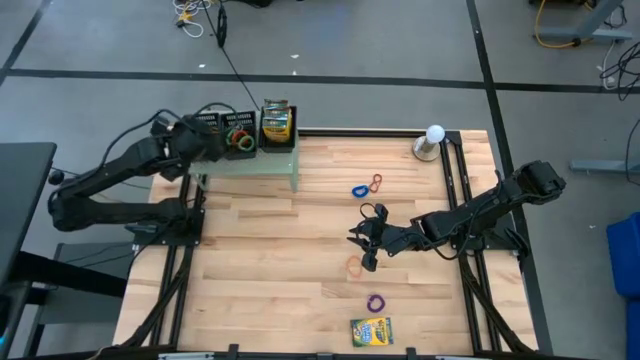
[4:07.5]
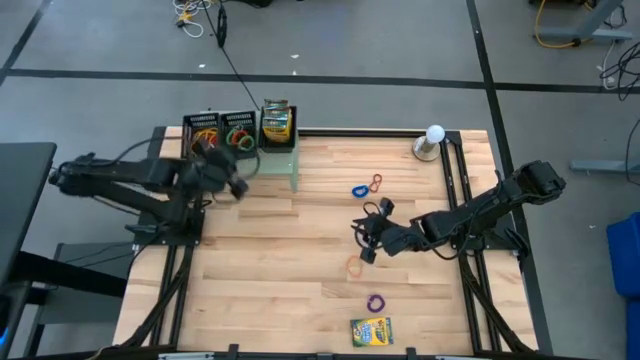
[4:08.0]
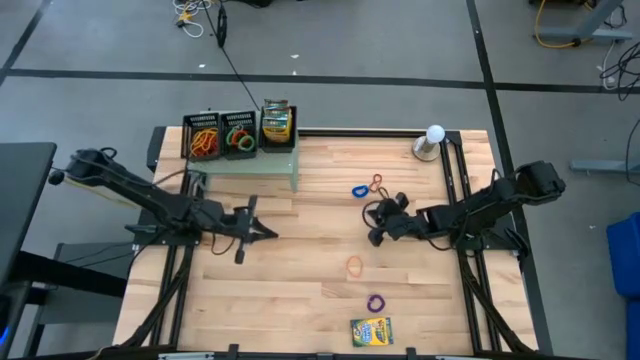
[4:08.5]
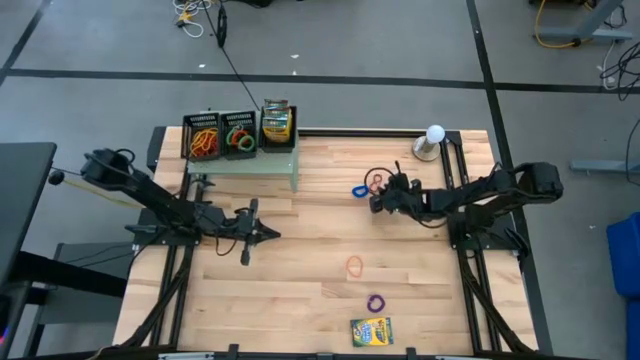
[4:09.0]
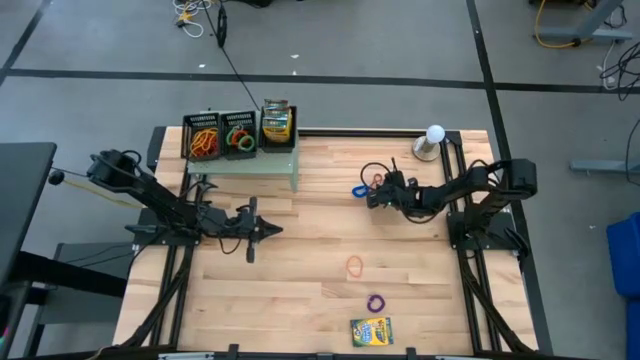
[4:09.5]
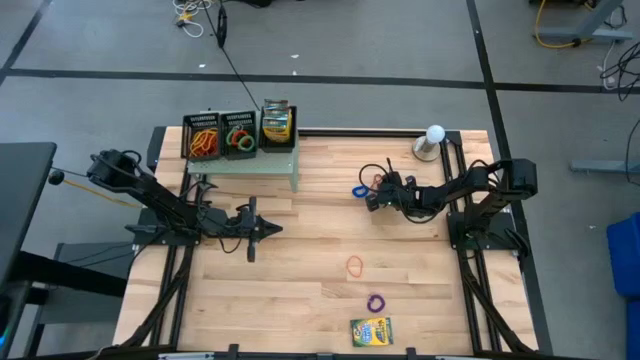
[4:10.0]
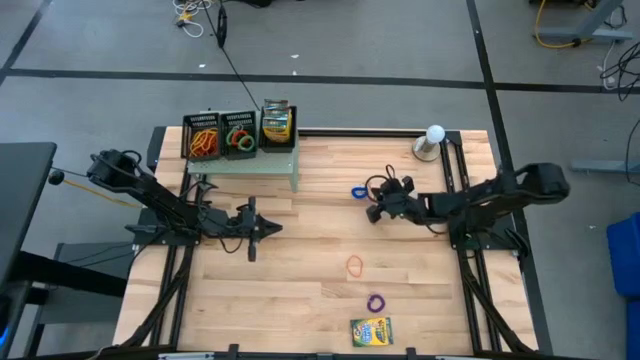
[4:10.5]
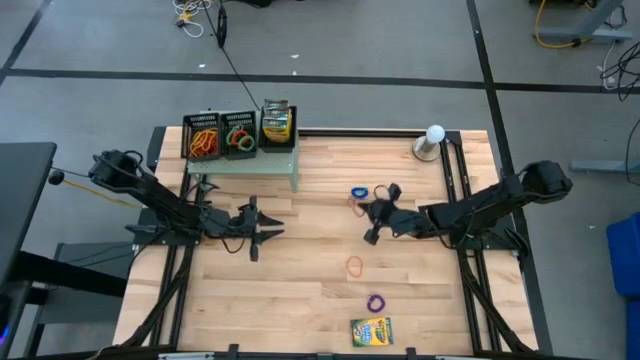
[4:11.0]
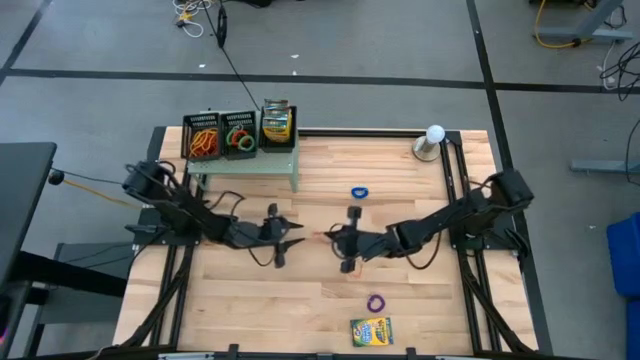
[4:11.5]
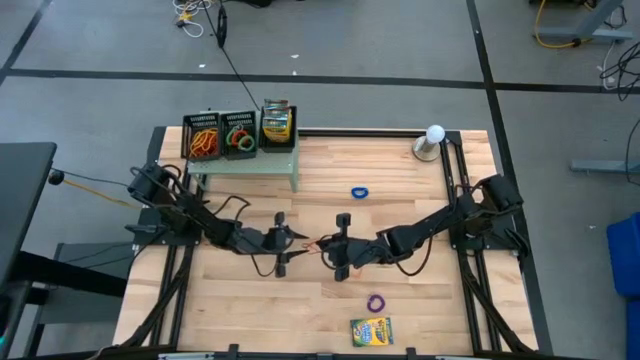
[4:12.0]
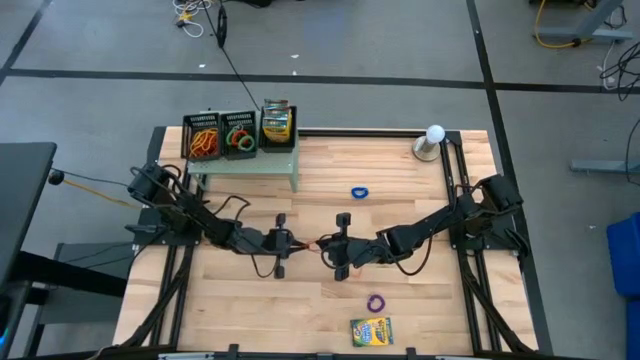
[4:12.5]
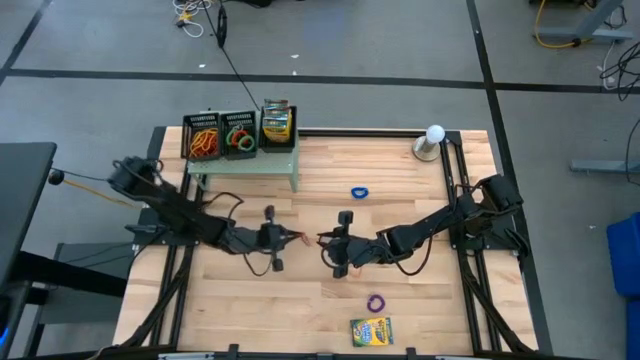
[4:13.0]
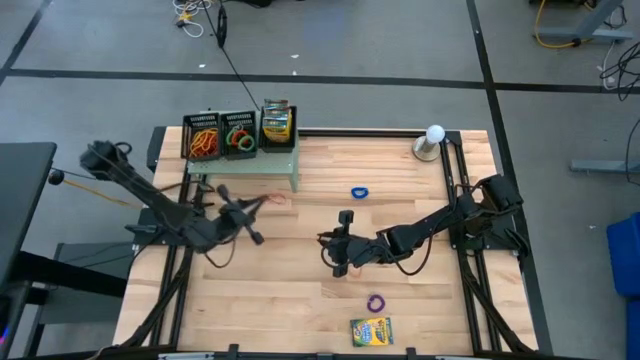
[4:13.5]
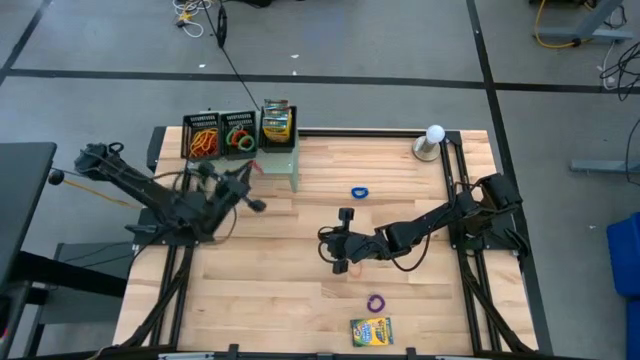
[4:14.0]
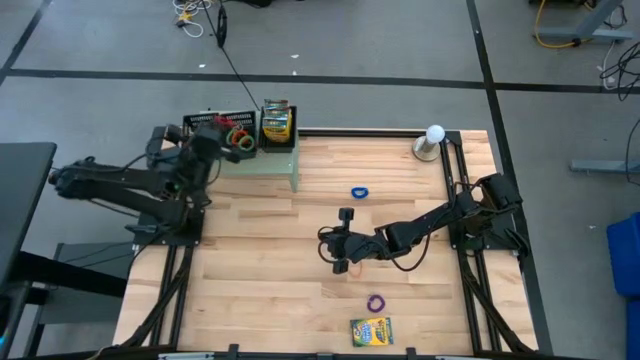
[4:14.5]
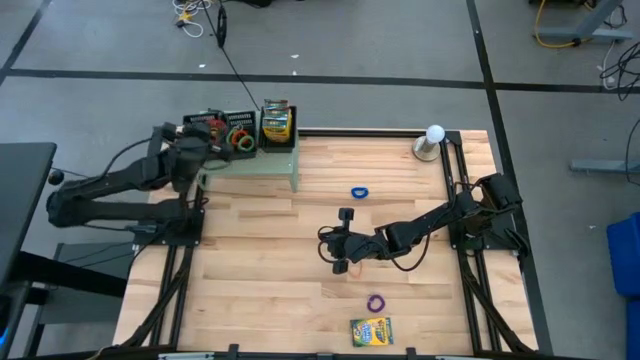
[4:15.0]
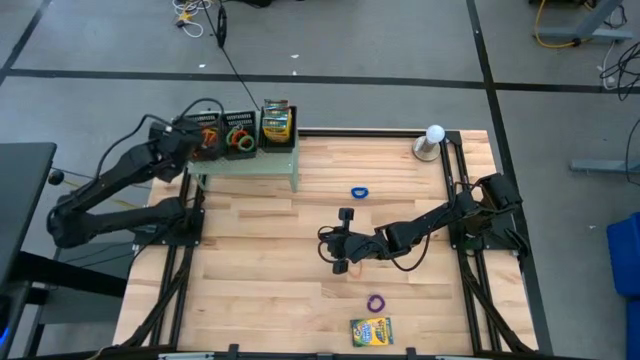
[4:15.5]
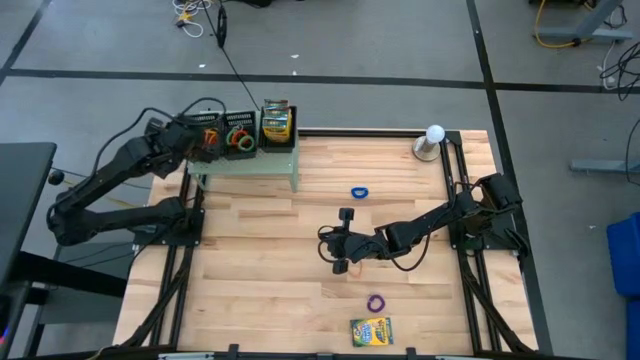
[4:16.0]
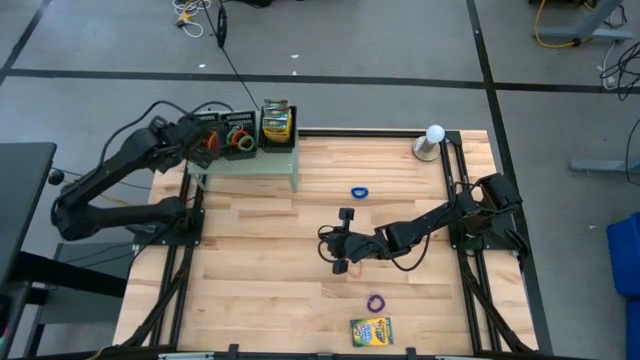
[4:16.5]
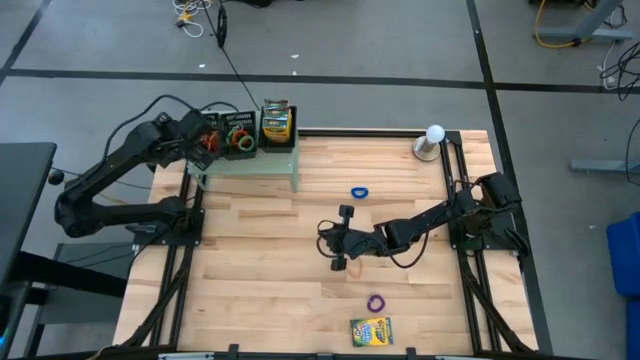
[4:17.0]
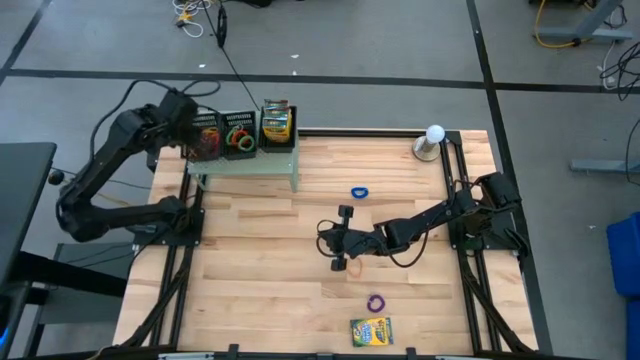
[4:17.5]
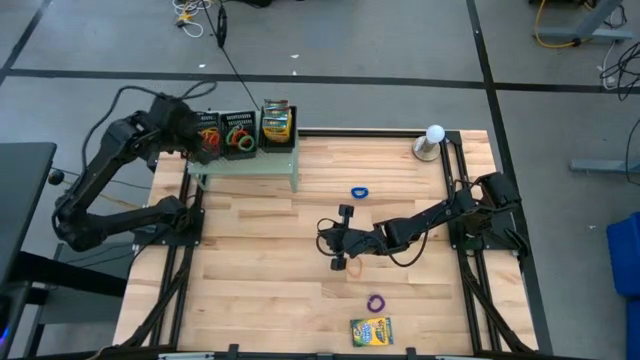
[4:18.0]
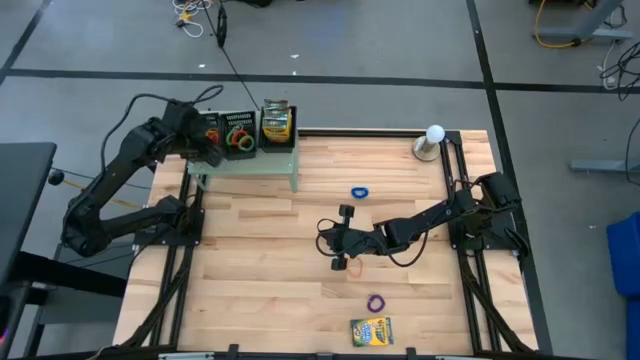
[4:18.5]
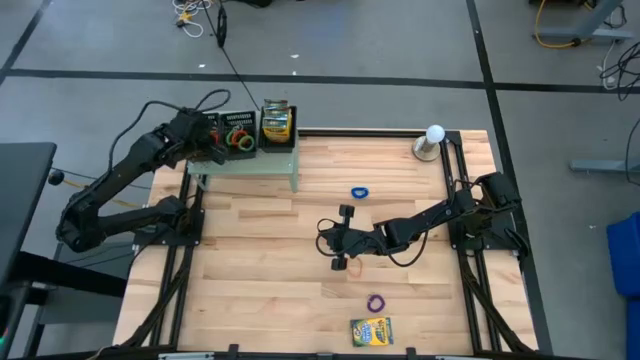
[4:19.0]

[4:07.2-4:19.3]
Task: Pick & Place Office Desk Supplies
Put the red rubber band into the left black bin on the shelf

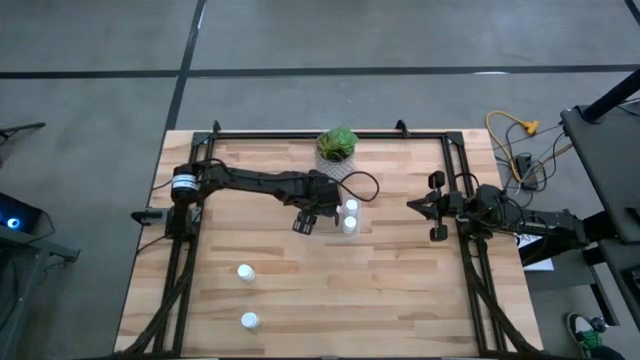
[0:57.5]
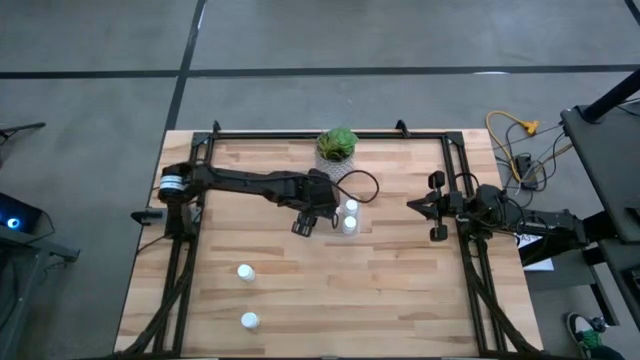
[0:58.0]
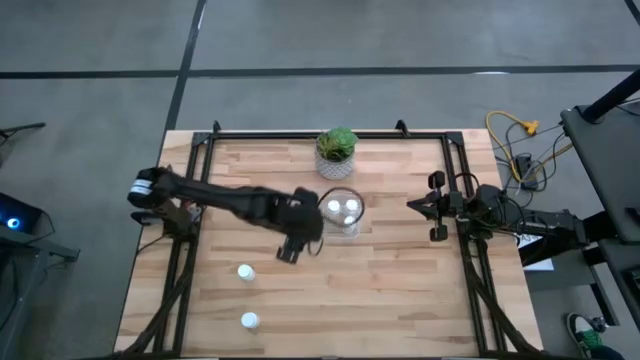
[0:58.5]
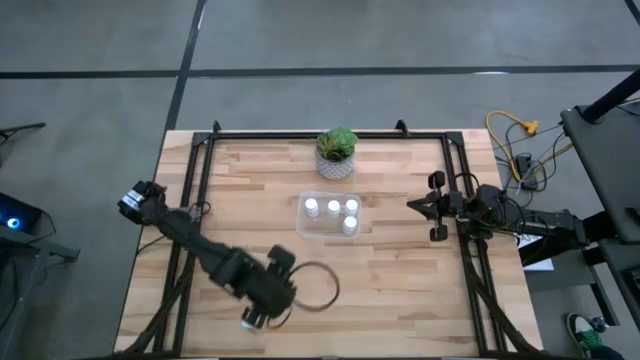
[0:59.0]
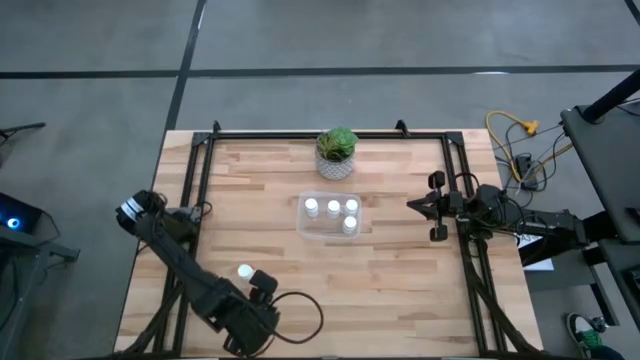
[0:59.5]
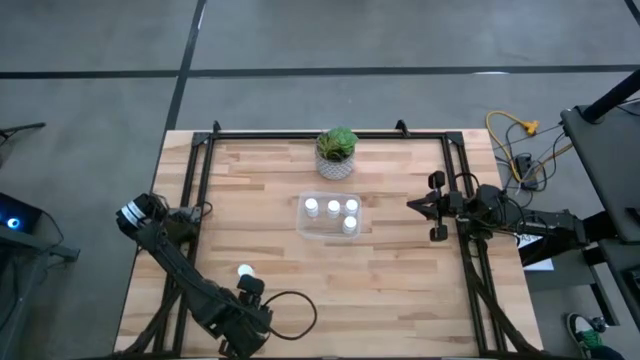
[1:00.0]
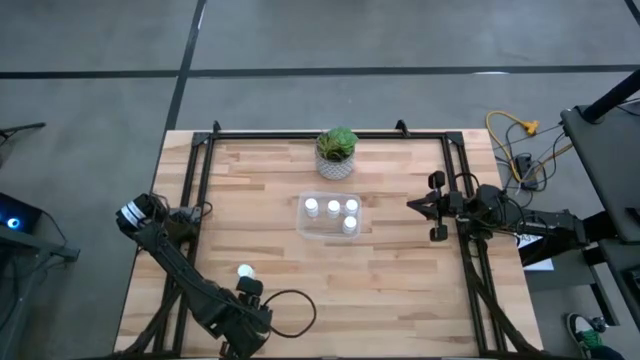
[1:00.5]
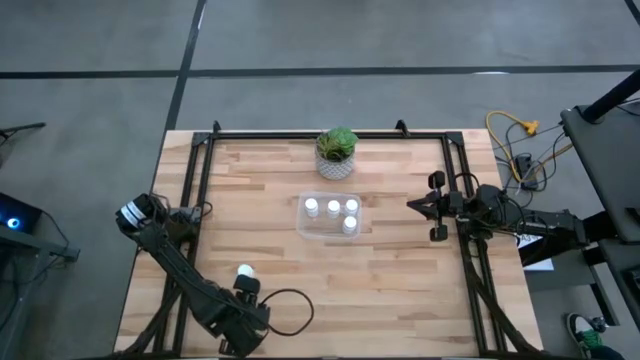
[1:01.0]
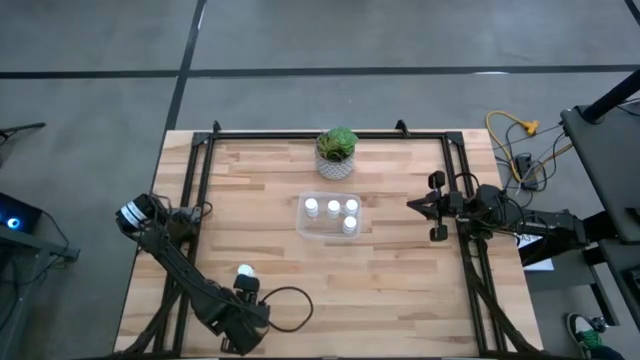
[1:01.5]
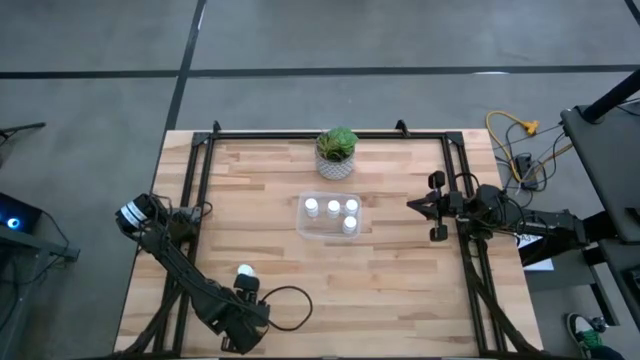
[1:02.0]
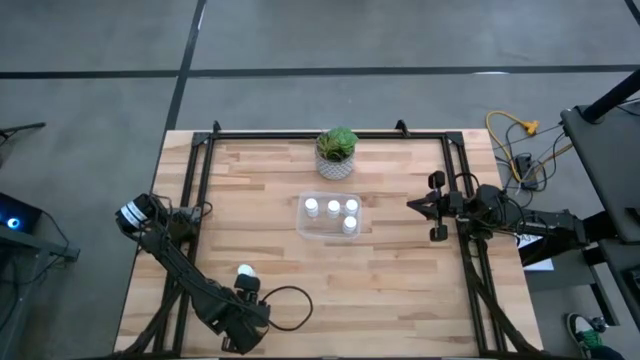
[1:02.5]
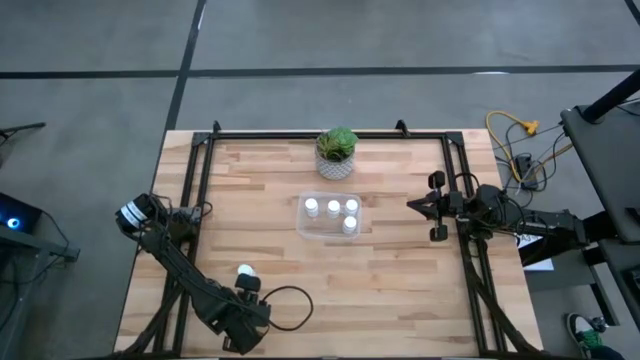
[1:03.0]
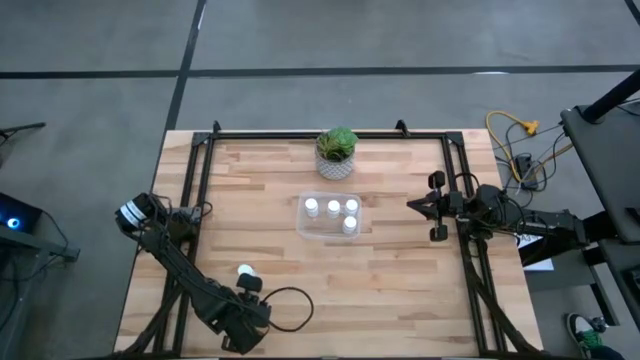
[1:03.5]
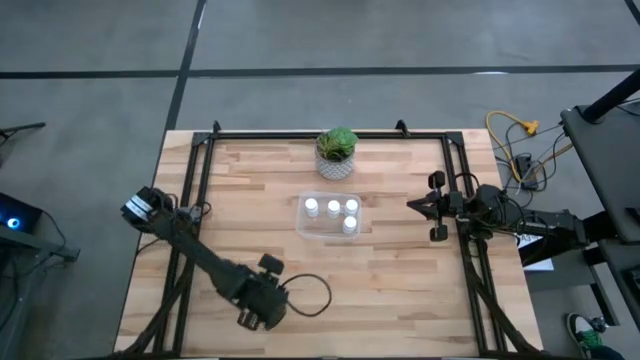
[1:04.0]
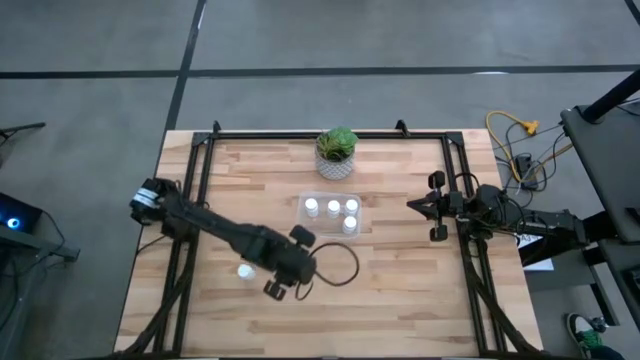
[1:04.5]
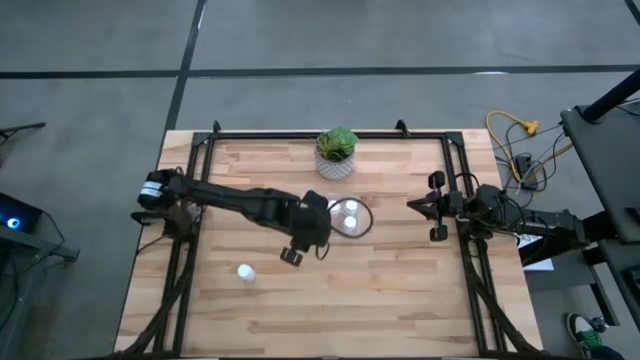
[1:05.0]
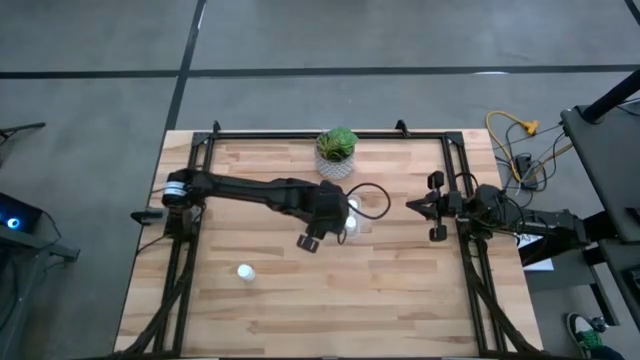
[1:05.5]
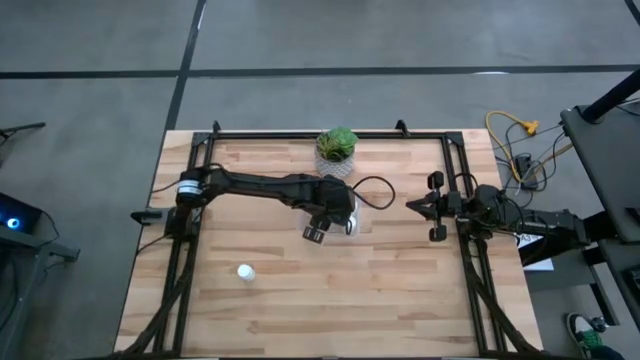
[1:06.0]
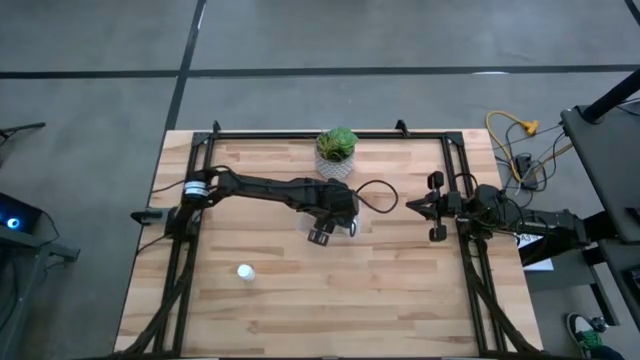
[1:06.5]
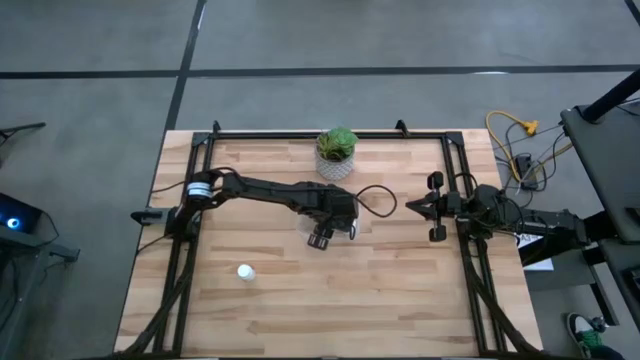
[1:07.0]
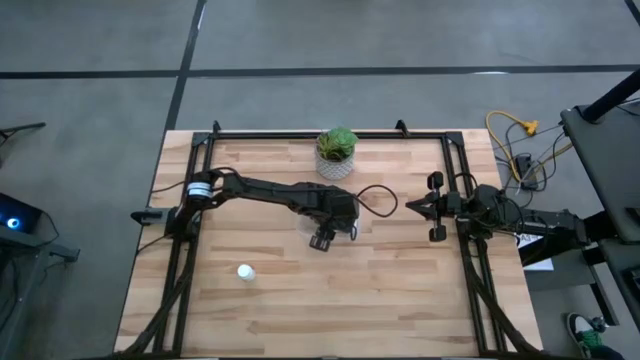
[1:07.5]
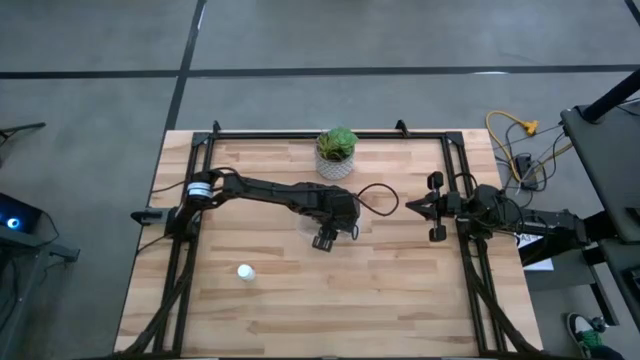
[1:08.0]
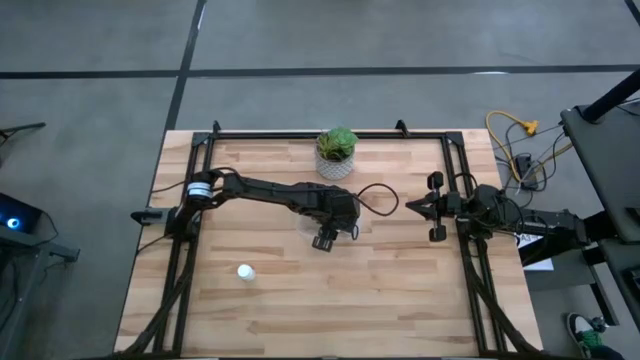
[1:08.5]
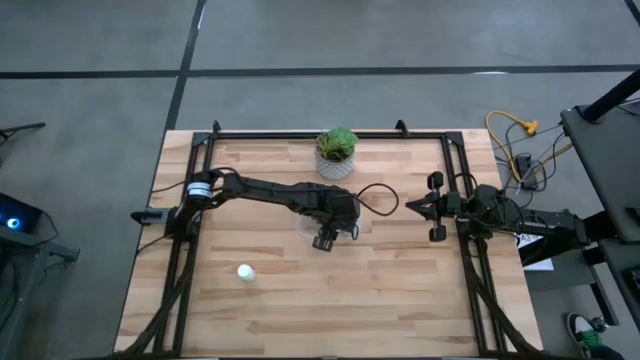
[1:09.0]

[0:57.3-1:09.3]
Task: Pick and place pill bottles into a basket
Put the white medicine bottle into the transparent bin
